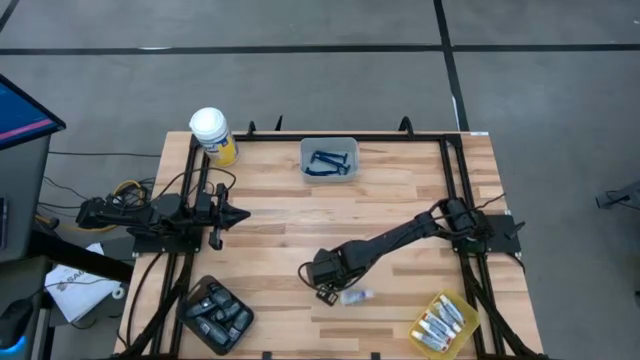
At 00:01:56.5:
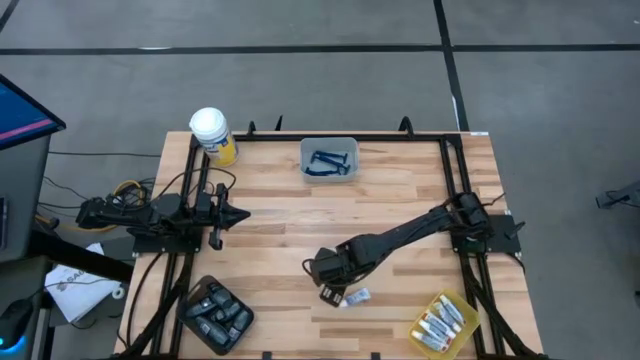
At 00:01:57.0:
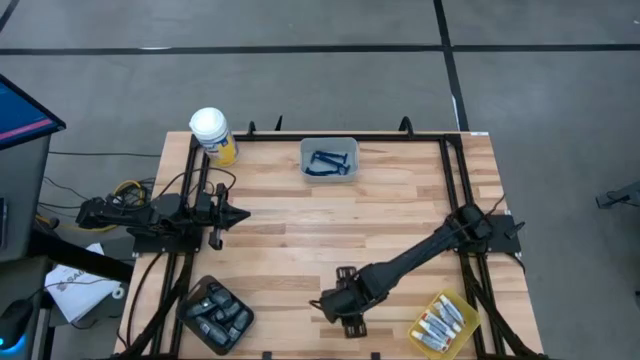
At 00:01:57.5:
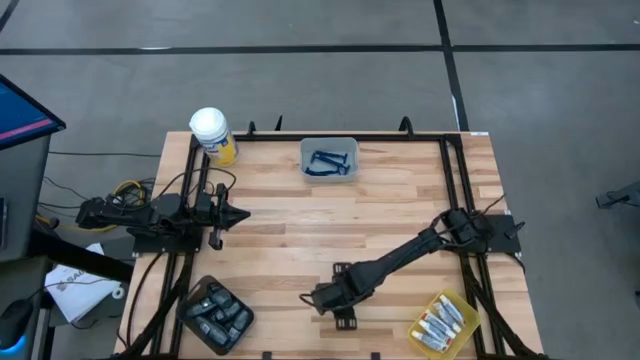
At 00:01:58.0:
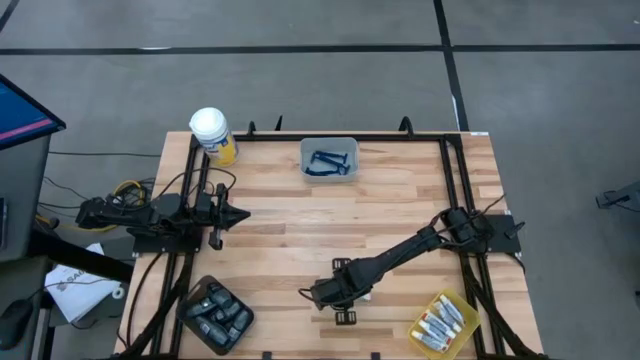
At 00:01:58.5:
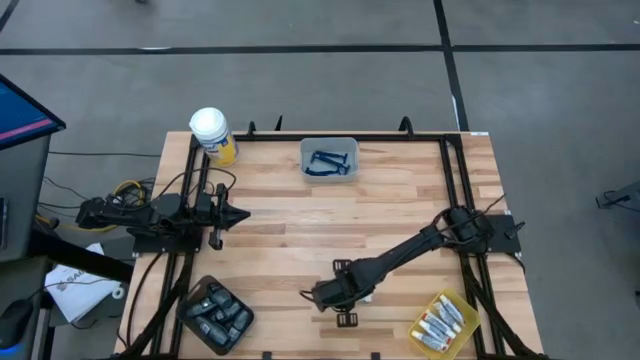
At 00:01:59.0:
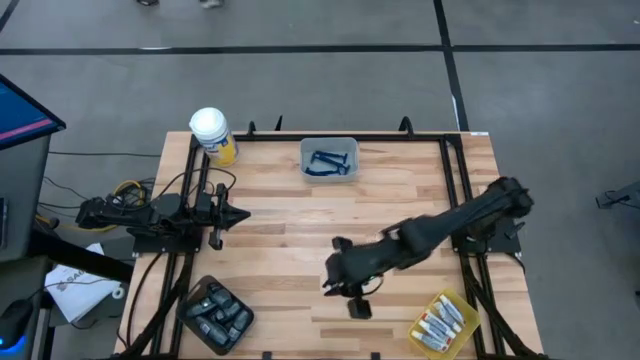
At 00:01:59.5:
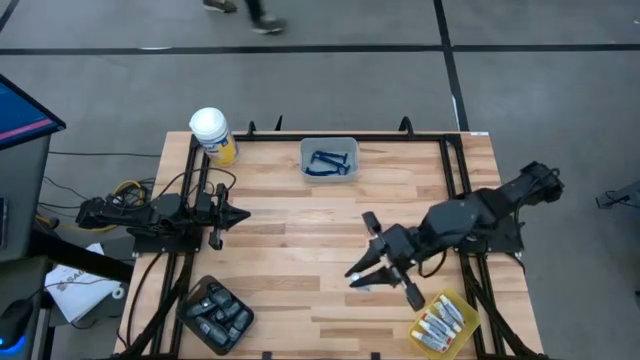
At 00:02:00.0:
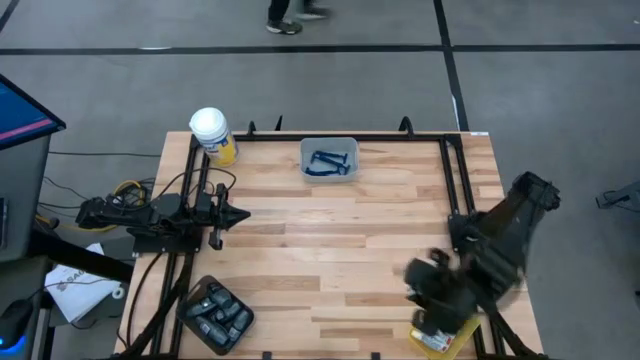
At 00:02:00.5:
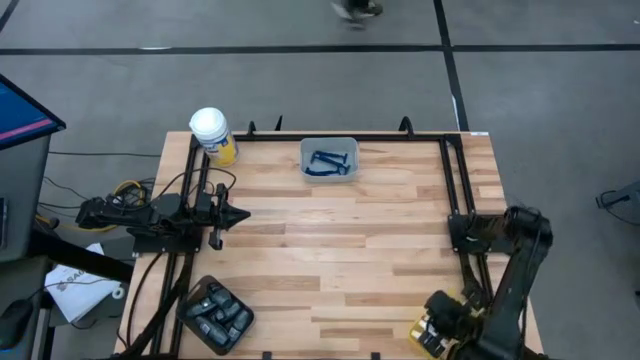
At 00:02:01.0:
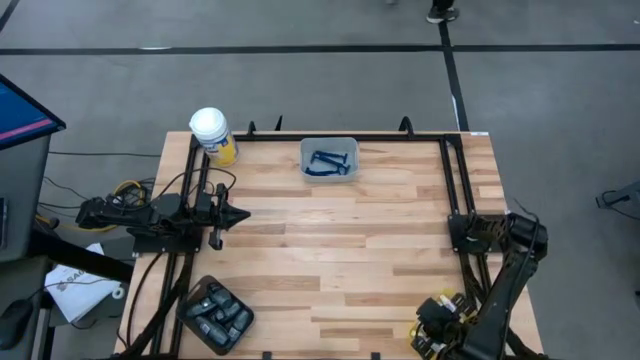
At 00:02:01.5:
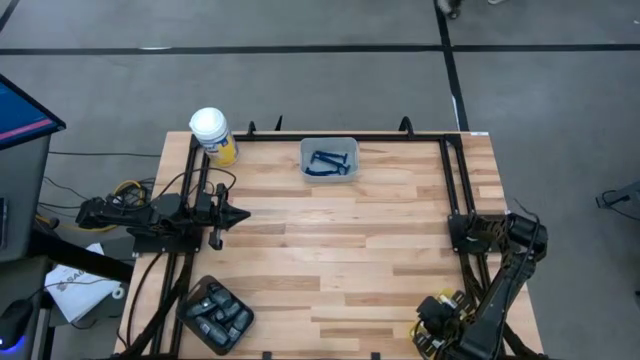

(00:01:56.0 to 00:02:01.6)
Task: Pick & Place Travel size toiletries
Put the white toothpaste into the yellow bin

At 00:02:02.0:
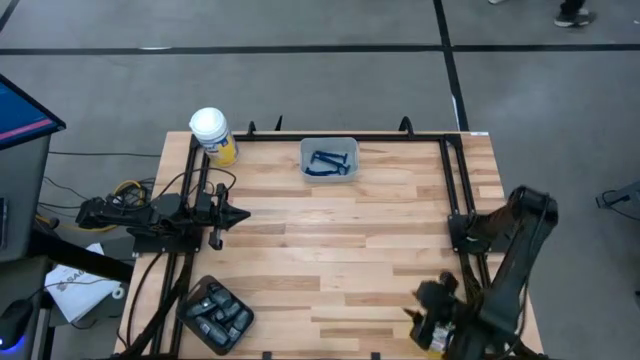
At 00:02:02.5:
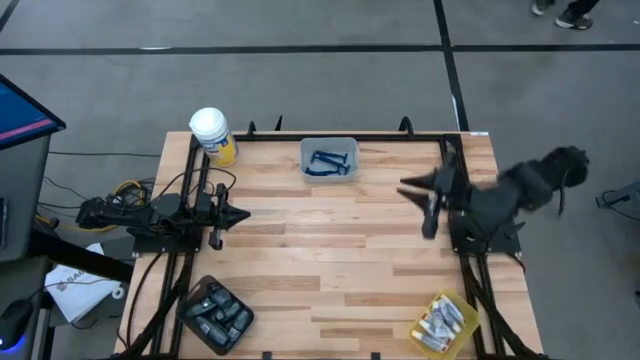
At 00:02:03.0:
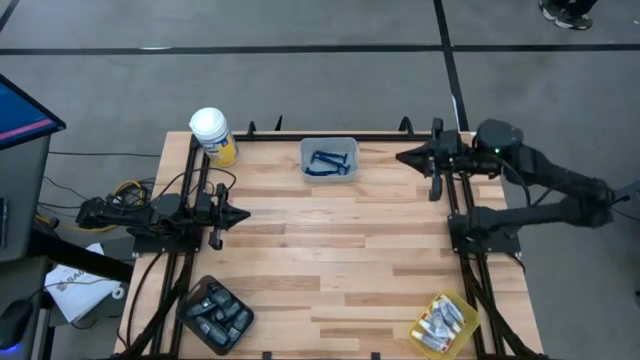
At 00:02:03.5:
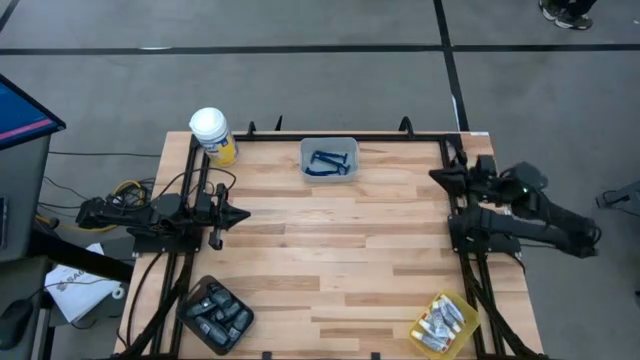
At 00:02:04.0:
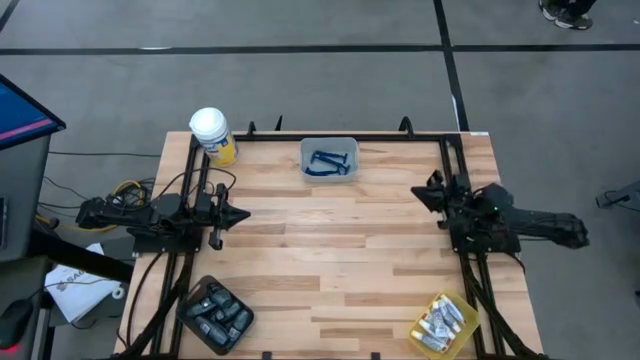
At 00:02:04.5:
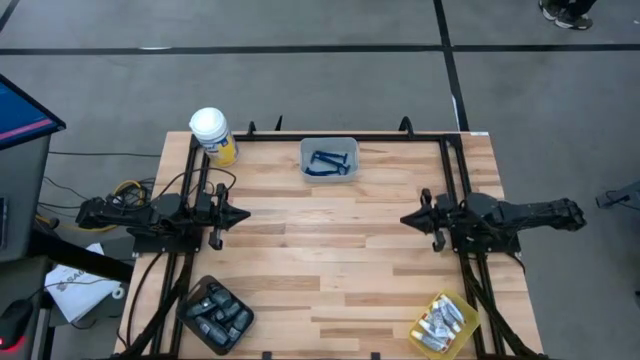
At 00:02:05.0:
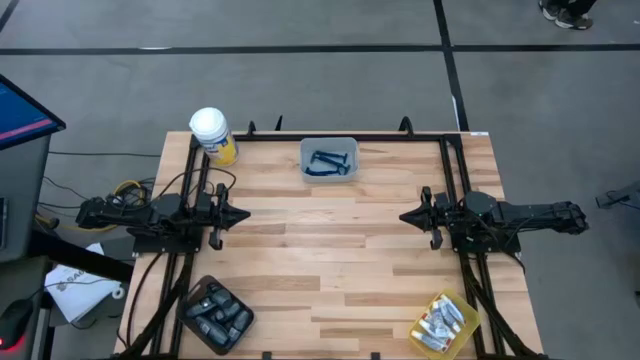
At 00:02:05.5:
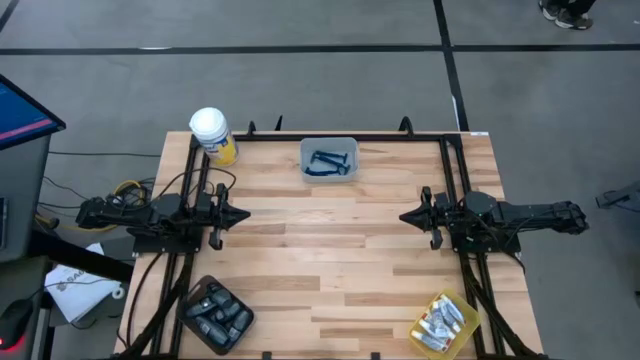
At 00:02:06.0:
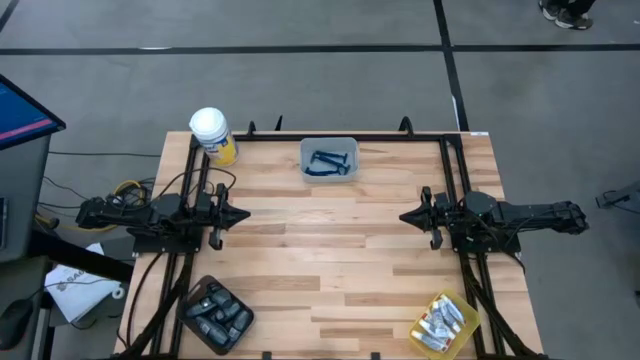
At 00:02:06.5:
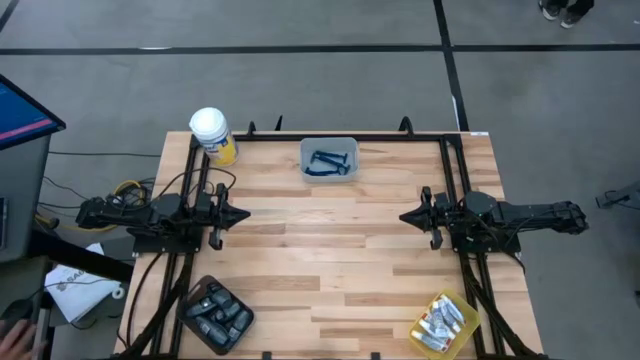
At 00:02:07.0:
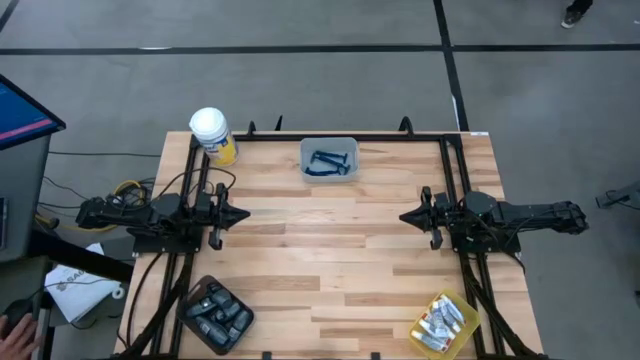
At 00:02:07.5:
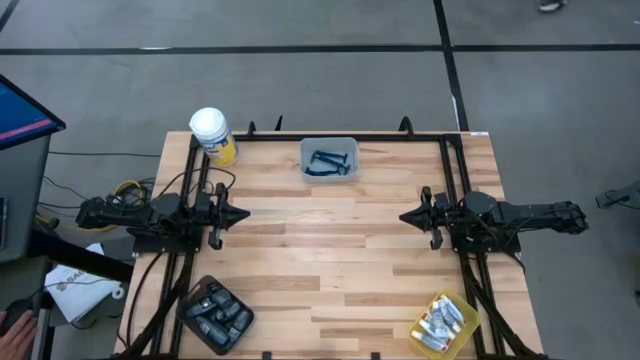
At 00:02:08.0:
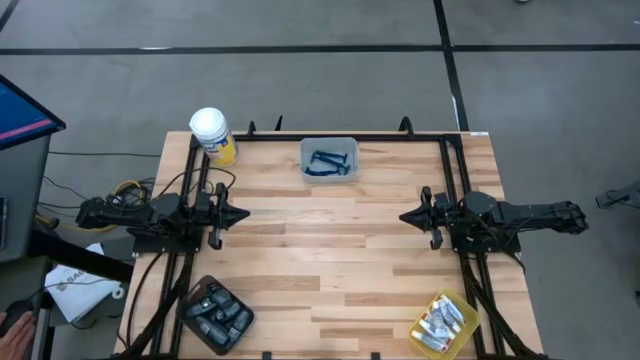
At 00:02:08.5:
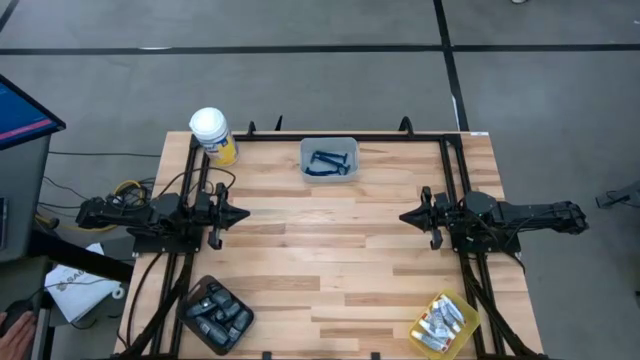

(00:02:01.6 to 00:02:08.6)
Return to Home Position

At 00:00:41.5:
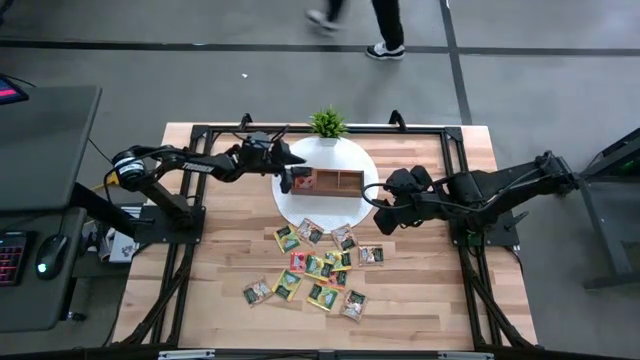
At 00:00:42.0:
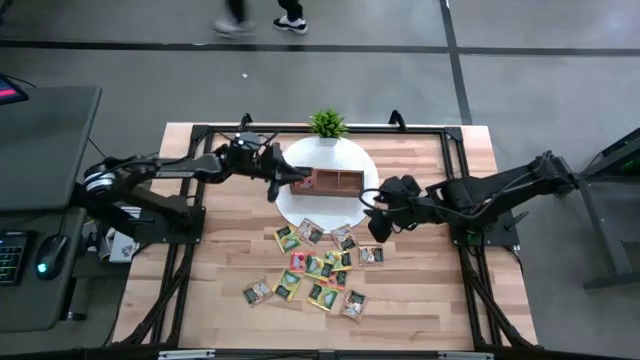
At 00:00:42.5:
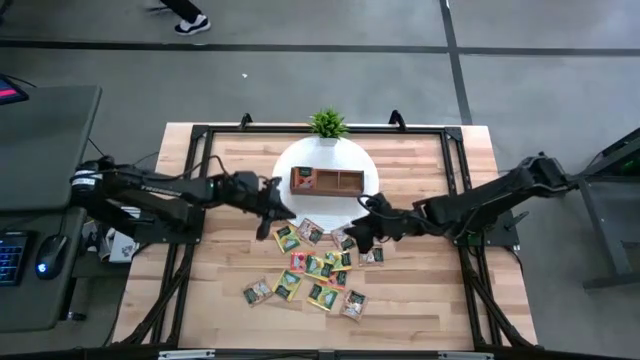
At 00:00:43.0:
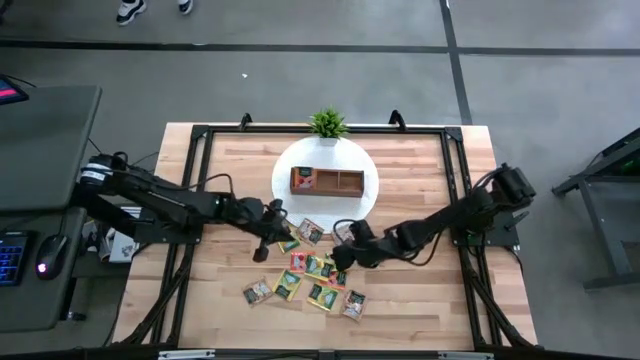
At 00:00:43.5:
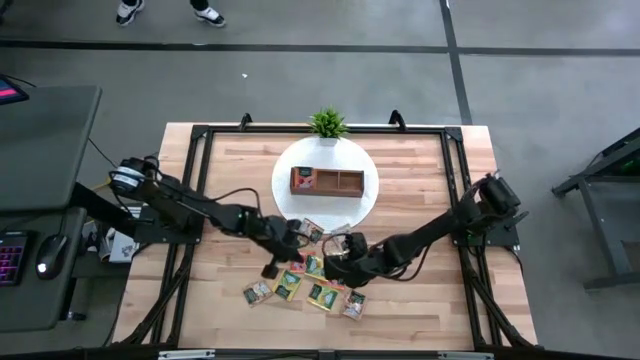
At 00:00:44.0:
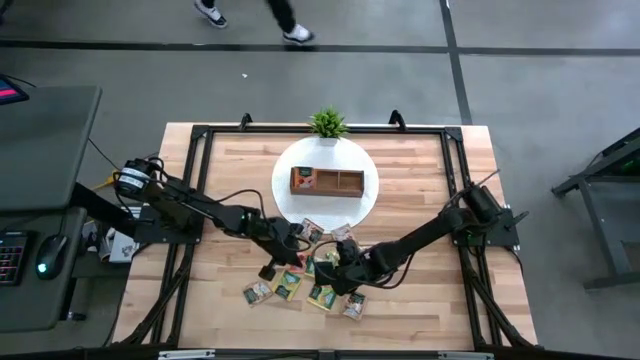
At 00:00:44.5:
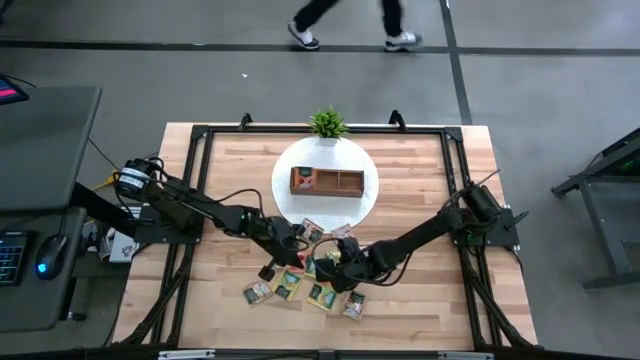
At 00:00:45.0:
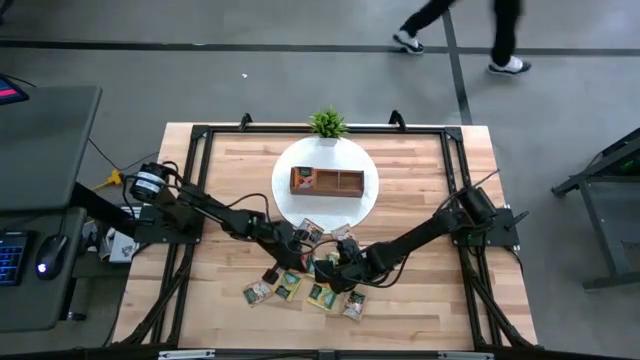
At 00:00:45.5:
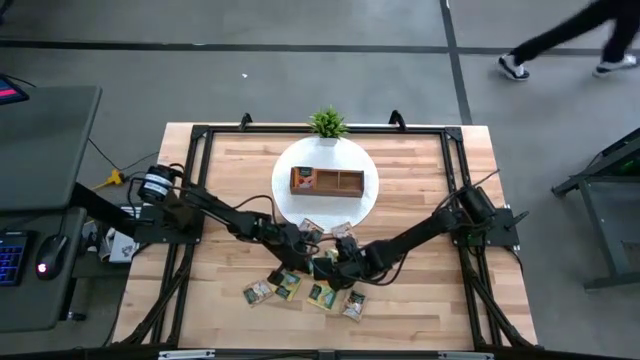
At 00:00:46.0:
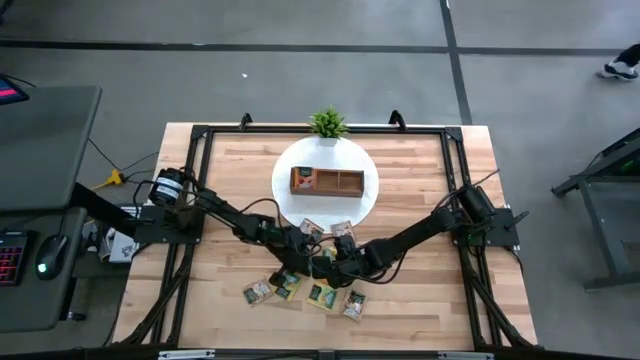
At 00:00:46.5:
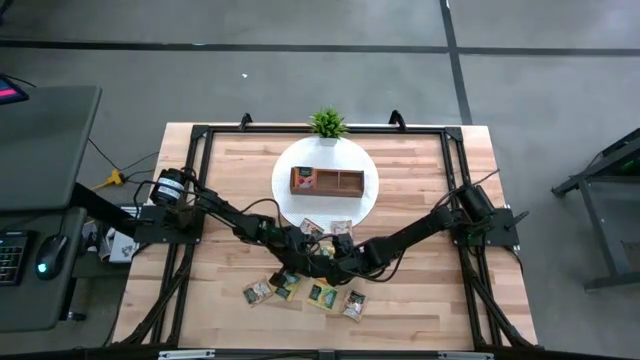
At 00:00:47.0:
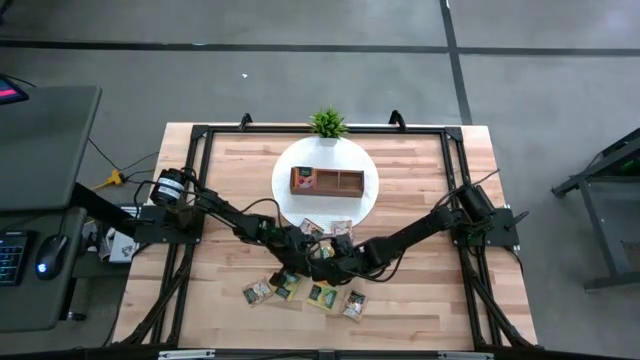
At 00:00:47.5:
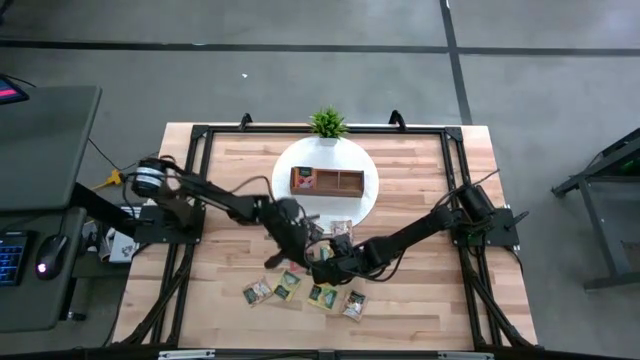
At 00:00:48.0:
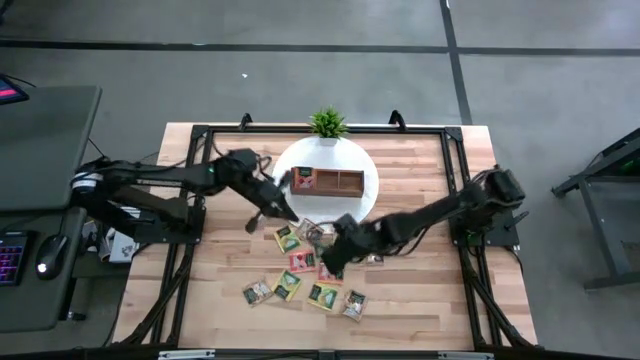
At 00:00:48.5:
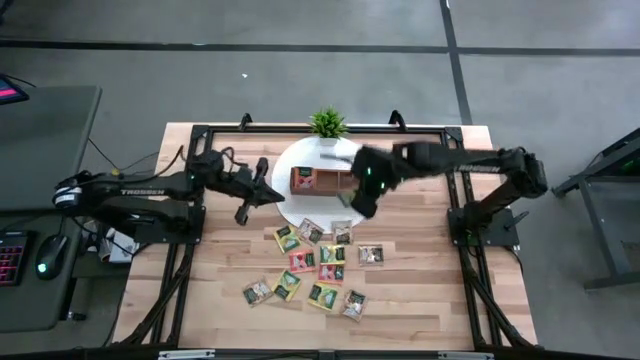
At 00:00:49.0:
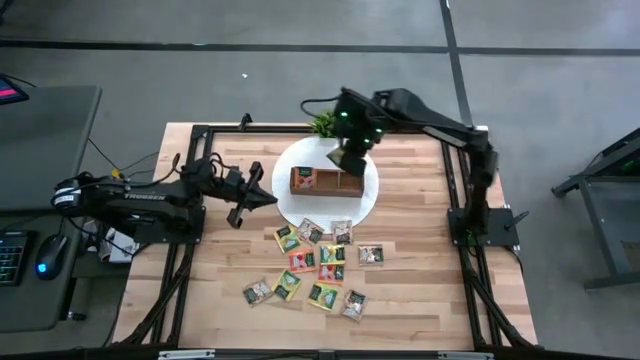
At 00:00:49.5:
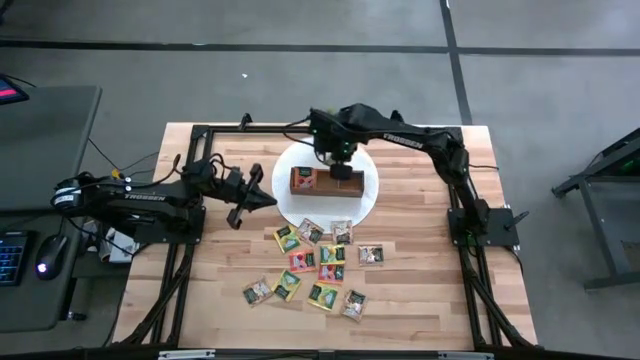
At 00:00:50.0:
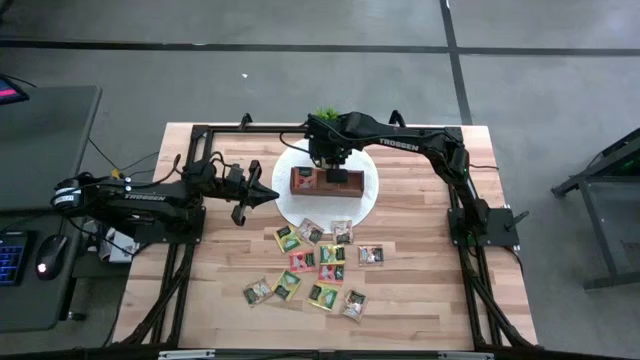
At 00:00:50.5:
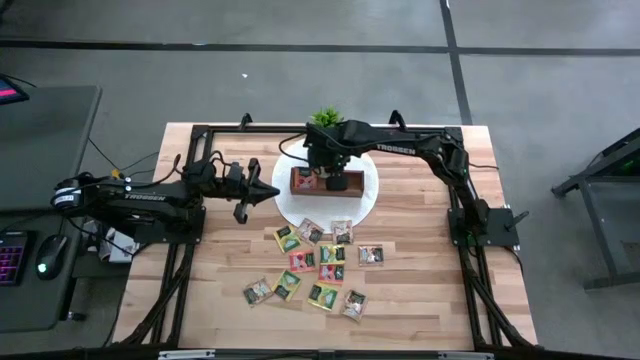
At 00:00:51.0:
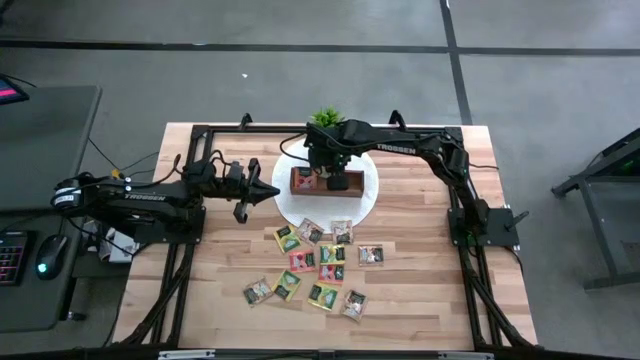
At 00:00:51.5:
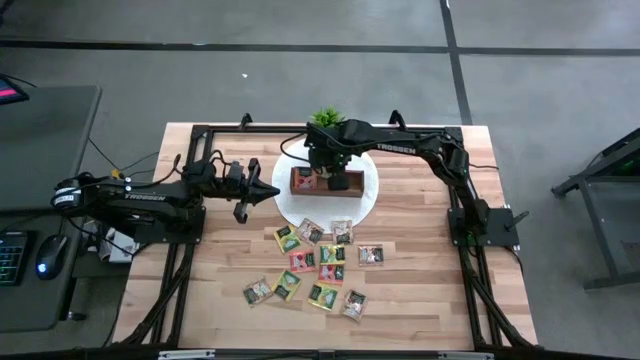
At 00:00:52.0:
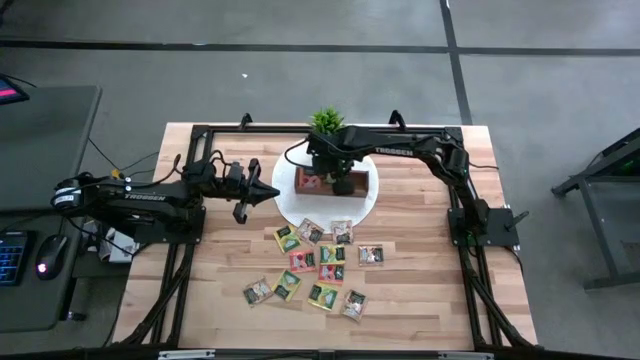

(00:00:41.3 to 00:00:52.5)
Task: Pick & Place Tea
Put the yellow tea bag into the middle section of the wooden organizer
